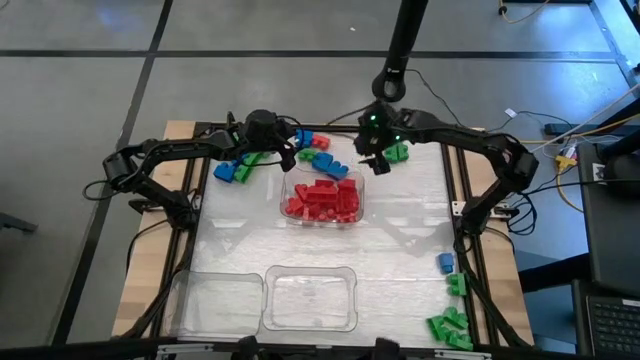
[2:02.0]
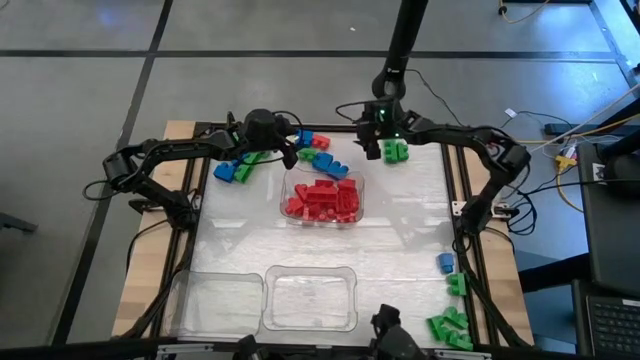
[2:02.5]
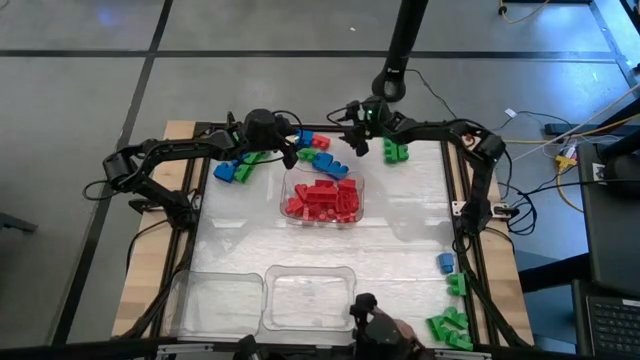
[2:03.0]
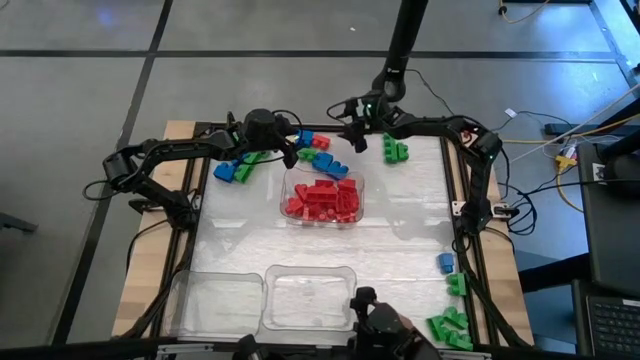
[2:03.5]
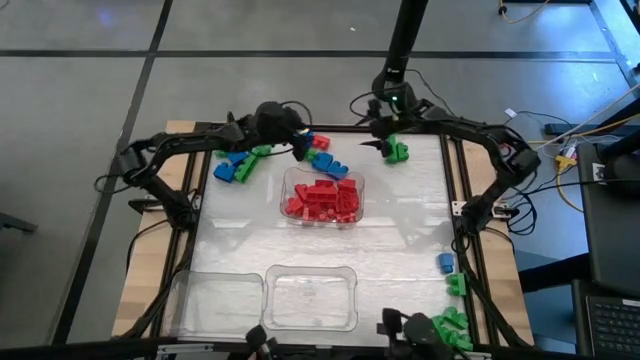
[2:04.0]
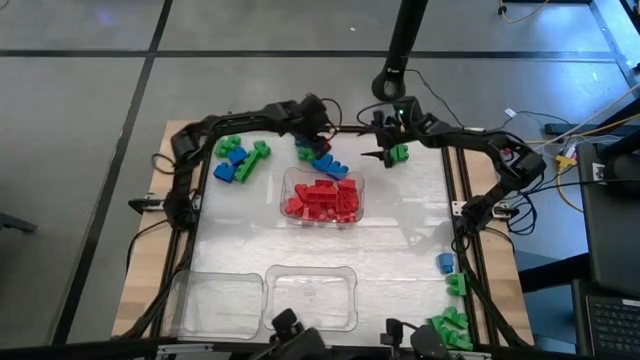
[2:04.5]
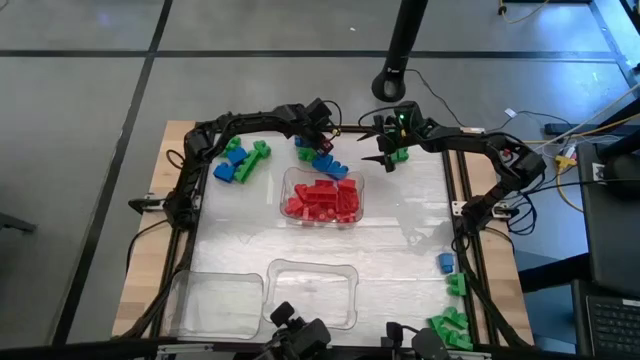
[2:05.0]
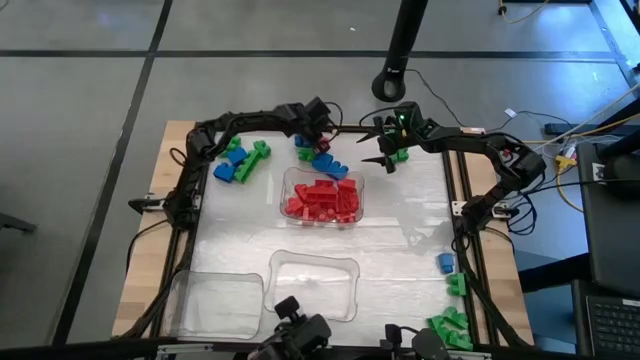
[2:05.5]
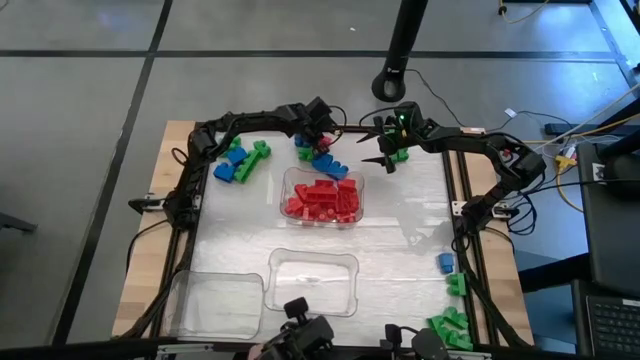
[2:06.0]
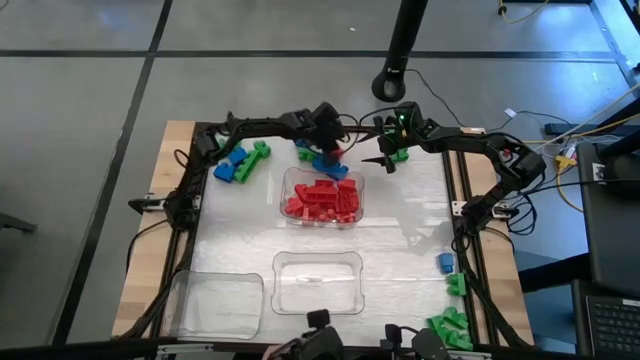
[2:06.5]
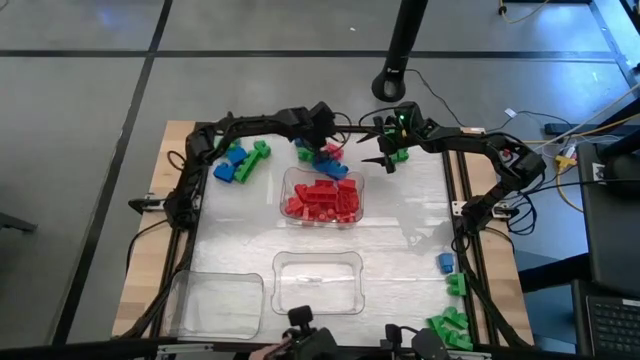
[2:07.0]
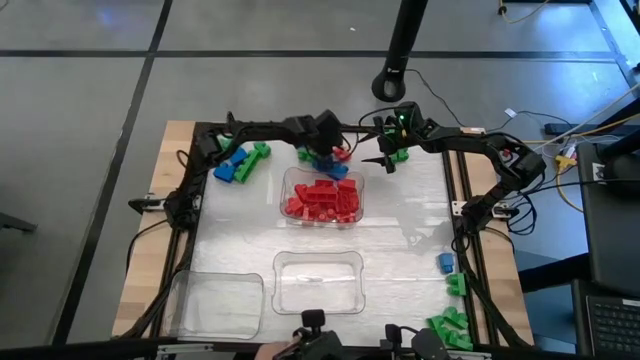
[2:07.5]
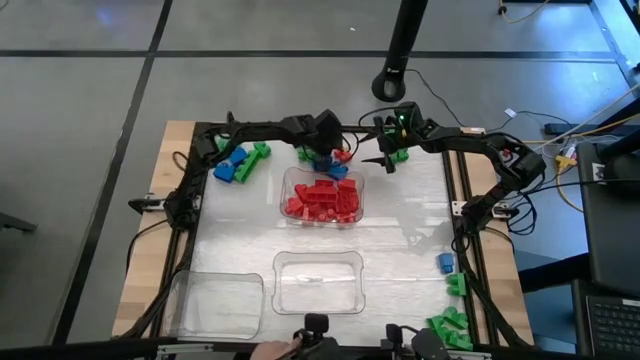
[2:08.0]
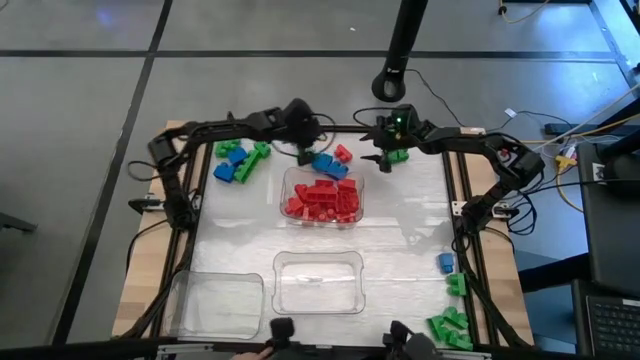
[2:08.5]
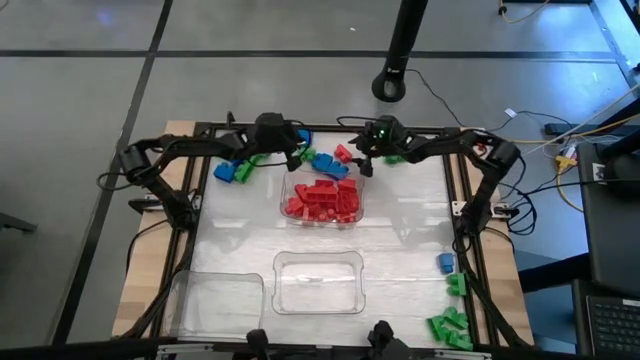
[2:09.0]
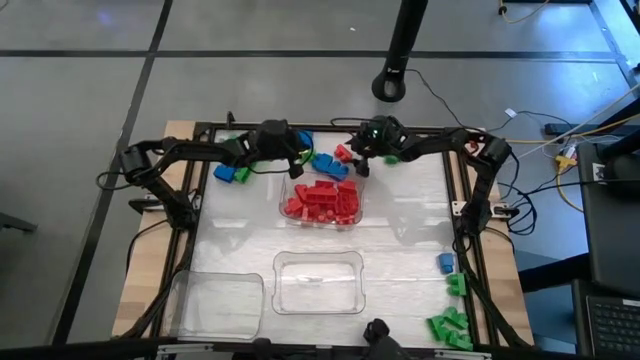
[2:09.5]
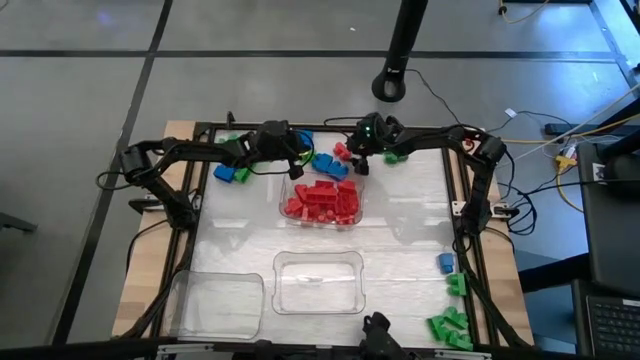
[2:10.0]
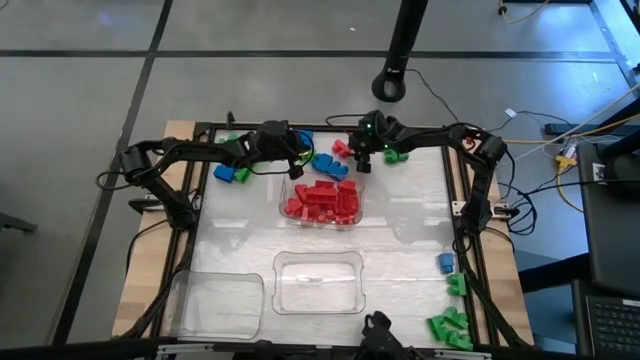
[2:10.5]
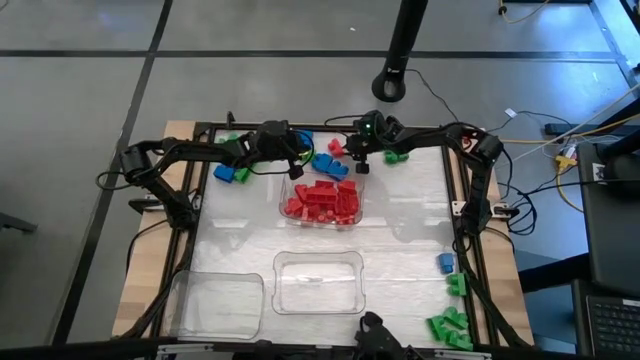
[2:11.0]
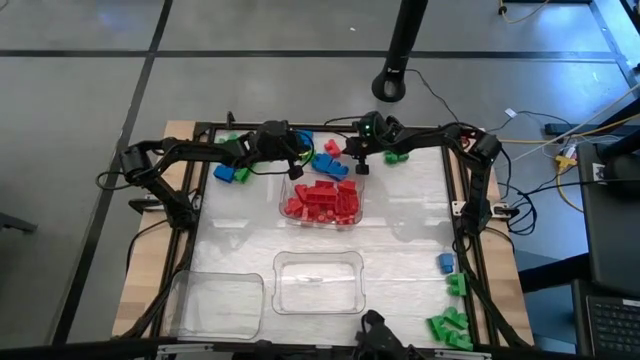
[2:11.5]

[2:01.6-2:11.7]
Task: Sort blocks
Put the red game piece into the top right transparent bin

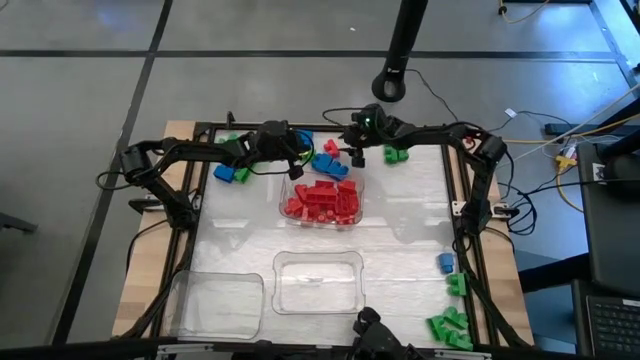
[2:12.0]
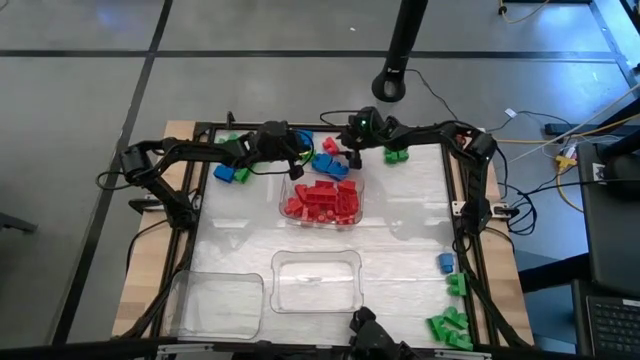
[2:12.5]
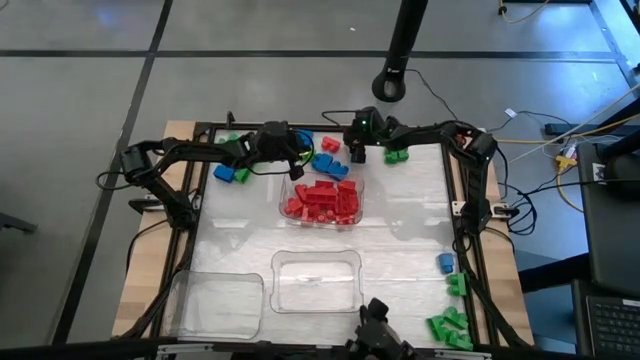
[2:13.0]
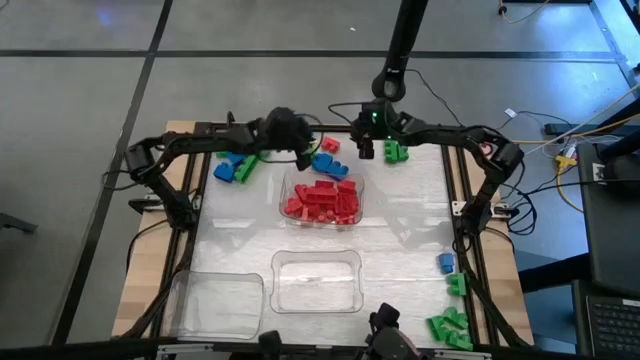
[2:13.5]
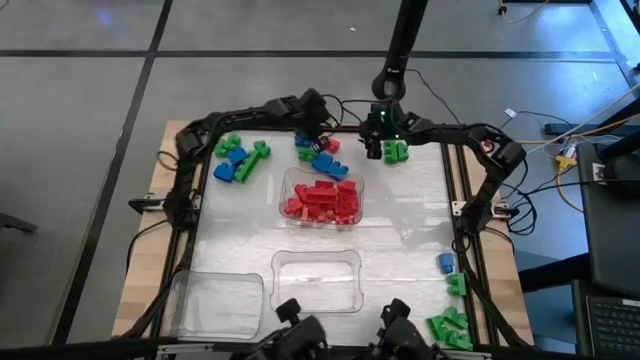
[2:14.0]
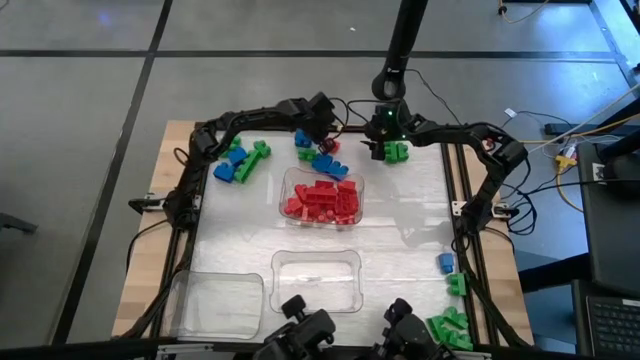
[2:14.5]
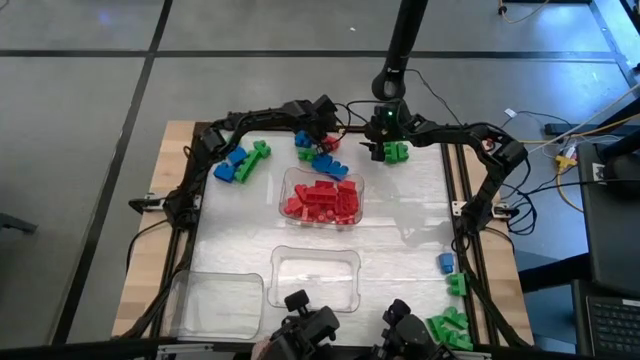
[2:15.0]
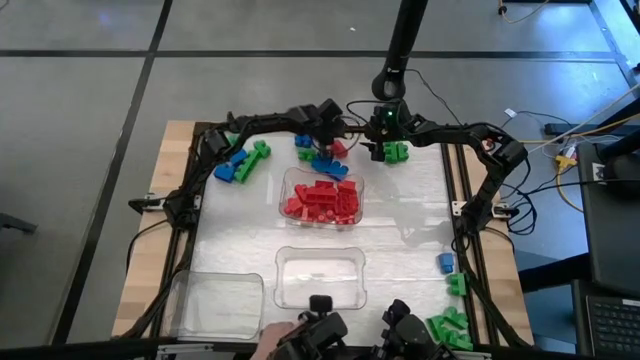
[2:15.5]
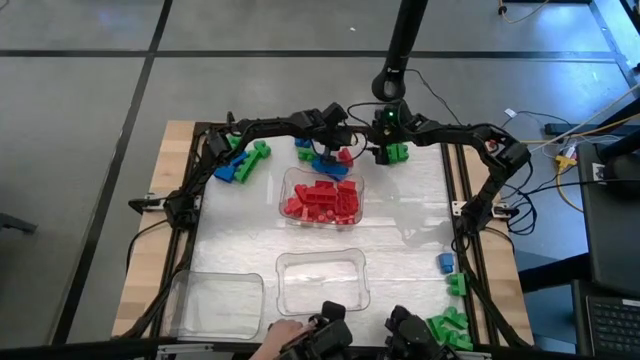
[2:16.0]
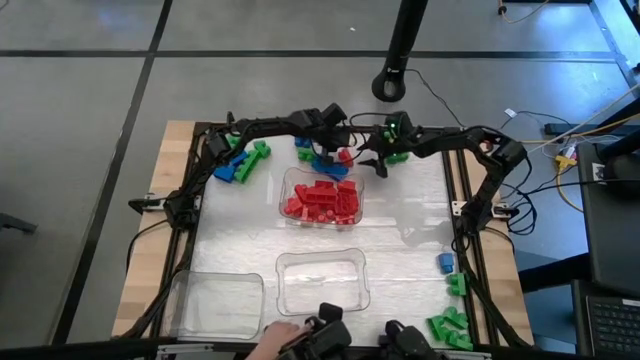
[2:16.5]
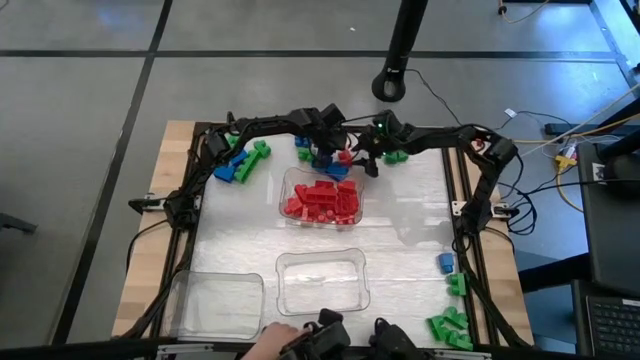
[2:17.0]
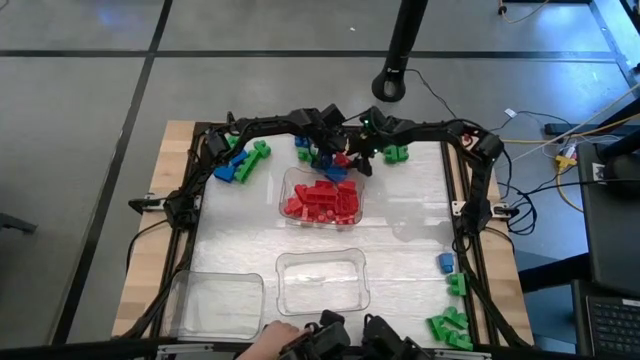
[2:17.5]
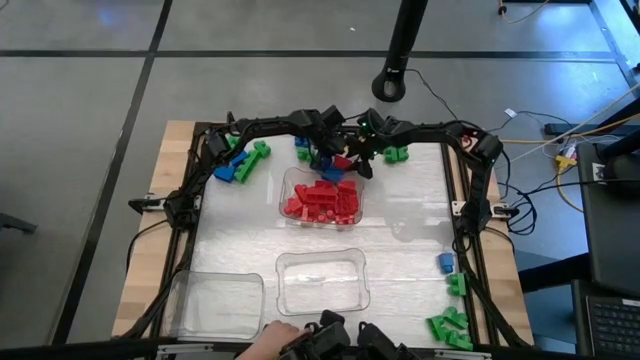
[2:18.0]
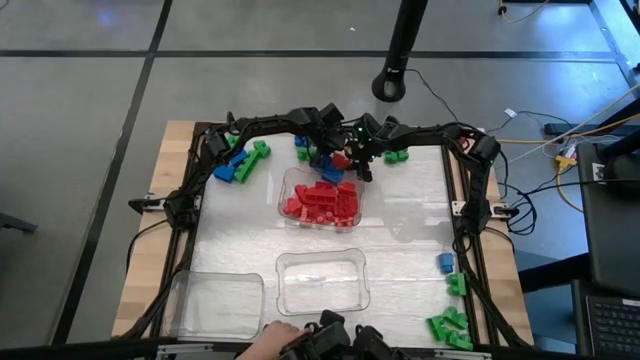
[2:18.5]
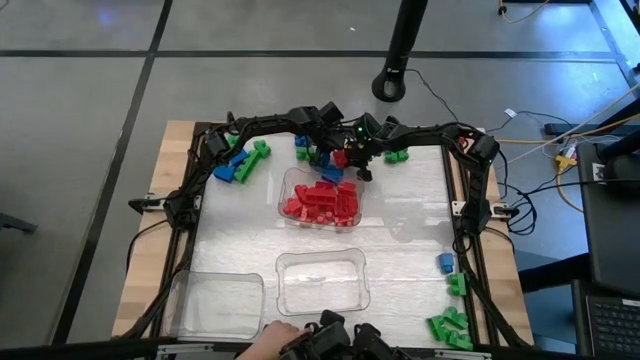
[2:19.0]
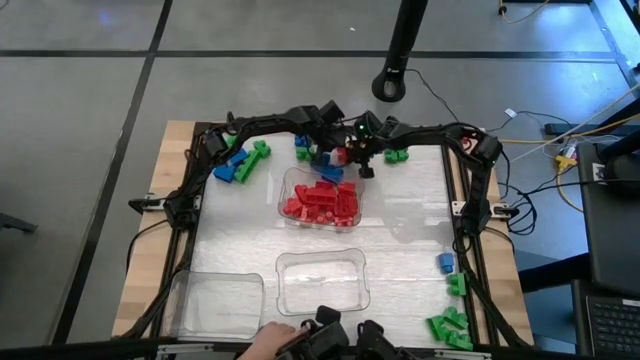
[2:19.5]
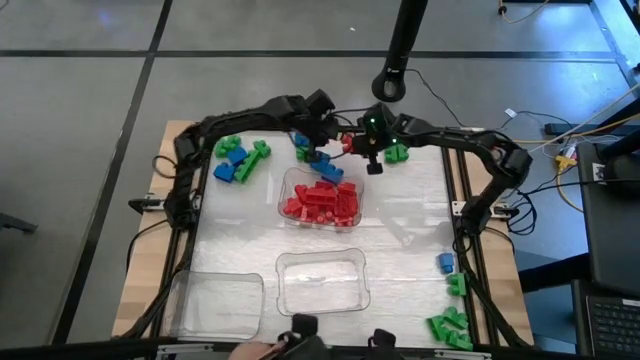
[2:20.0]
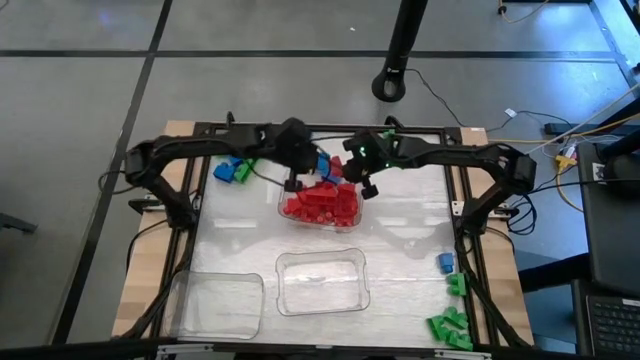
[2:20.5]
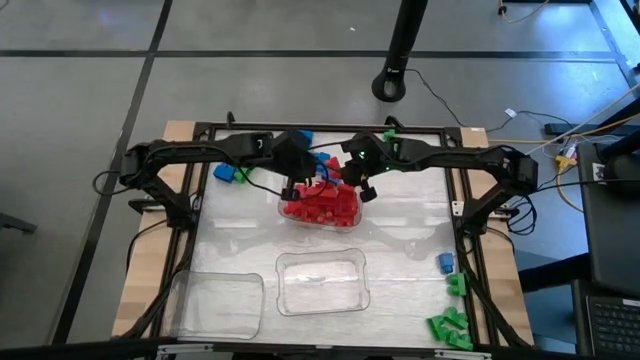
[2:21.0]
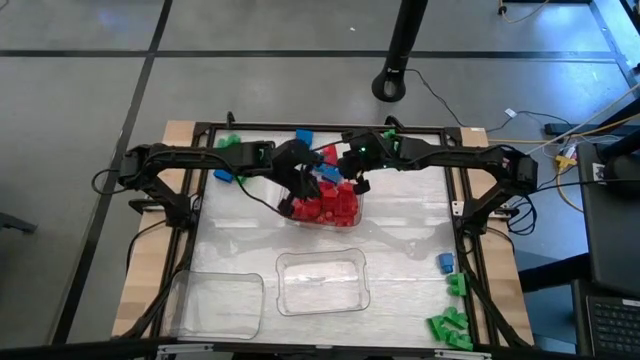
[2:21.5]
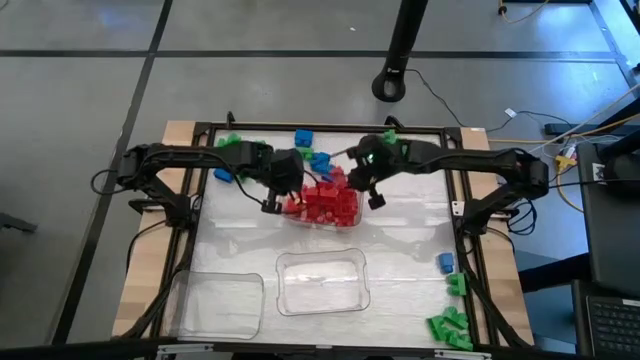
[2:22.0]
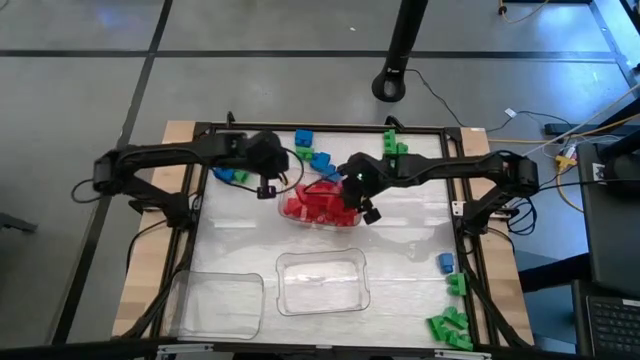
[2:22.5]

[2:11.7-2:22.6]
Put the red game piece into the top right transparent bin
